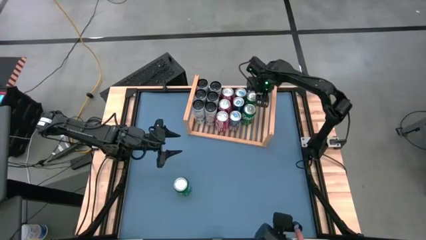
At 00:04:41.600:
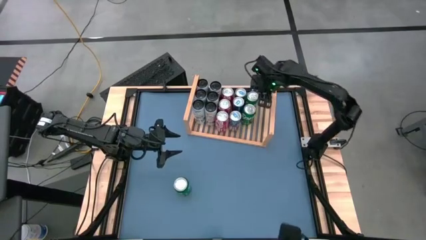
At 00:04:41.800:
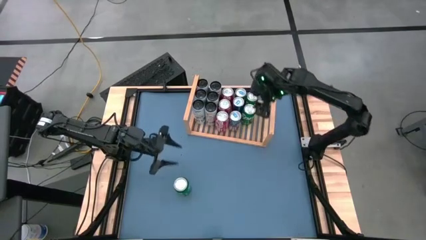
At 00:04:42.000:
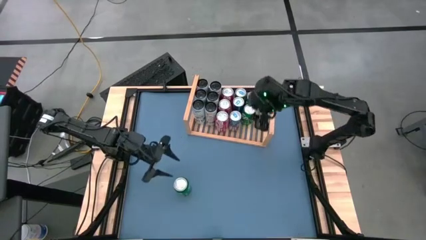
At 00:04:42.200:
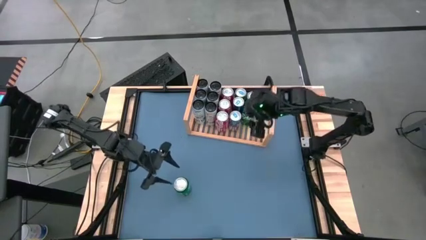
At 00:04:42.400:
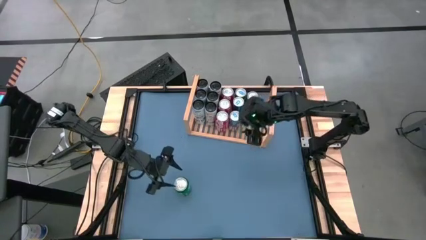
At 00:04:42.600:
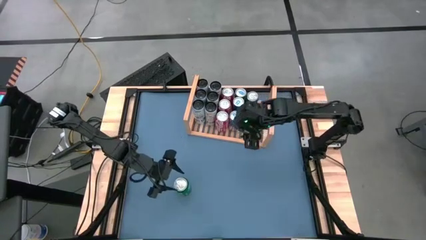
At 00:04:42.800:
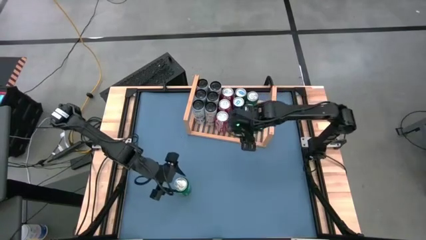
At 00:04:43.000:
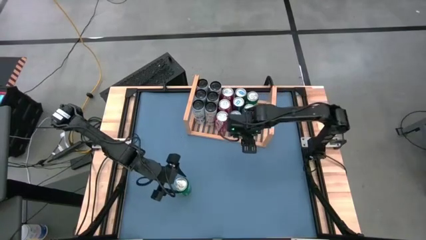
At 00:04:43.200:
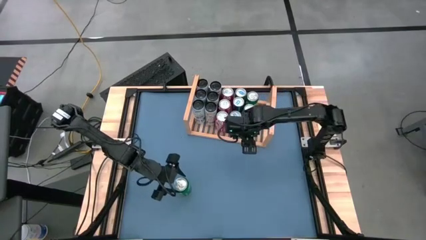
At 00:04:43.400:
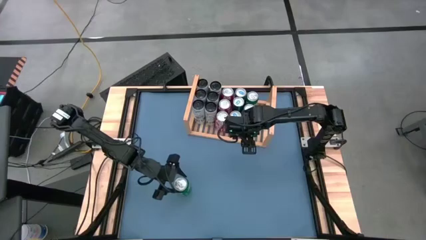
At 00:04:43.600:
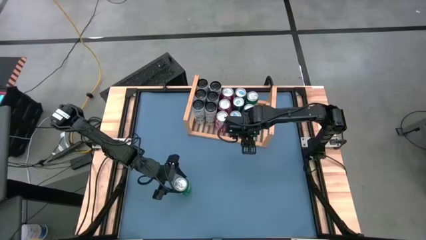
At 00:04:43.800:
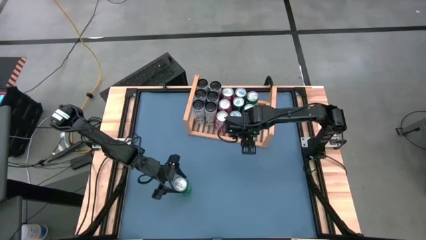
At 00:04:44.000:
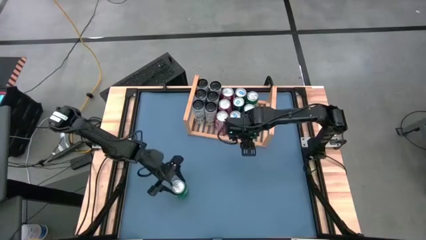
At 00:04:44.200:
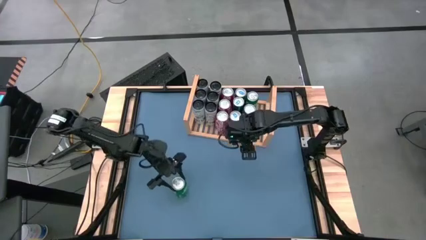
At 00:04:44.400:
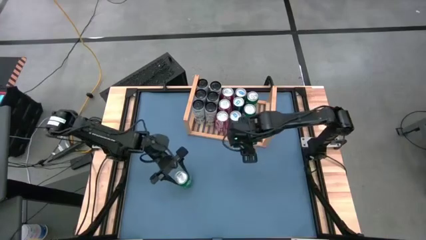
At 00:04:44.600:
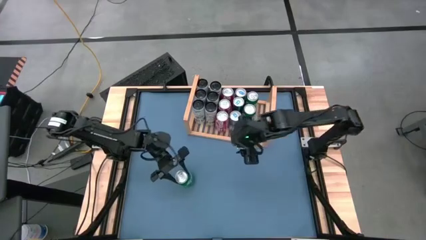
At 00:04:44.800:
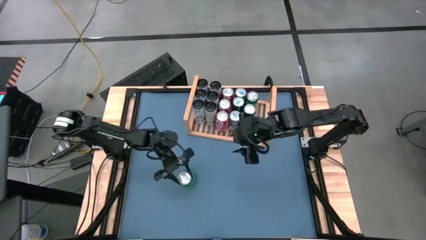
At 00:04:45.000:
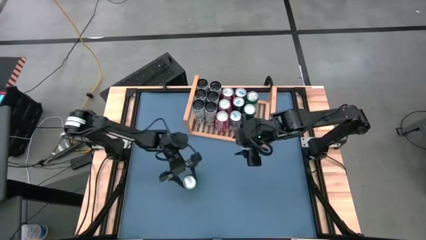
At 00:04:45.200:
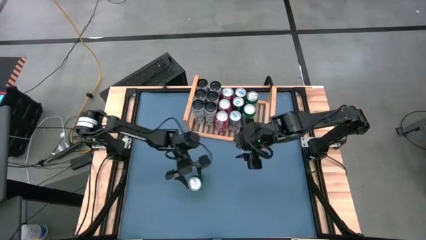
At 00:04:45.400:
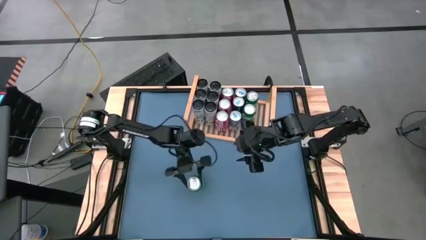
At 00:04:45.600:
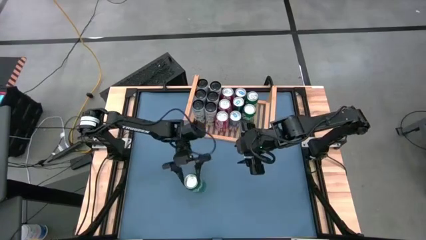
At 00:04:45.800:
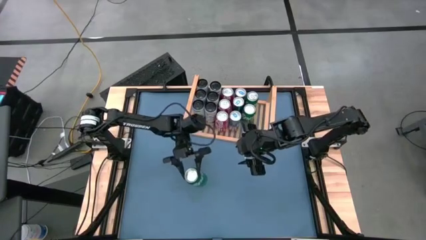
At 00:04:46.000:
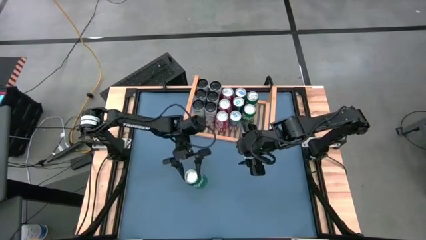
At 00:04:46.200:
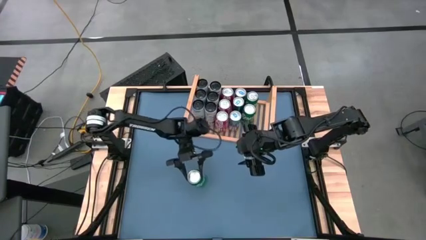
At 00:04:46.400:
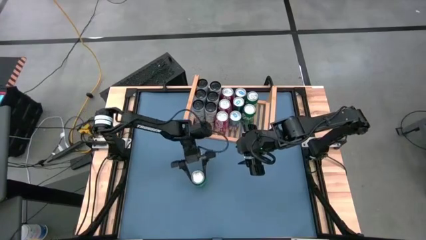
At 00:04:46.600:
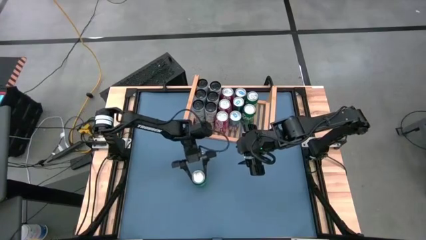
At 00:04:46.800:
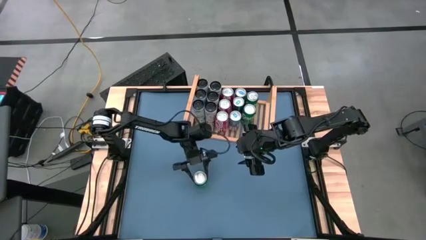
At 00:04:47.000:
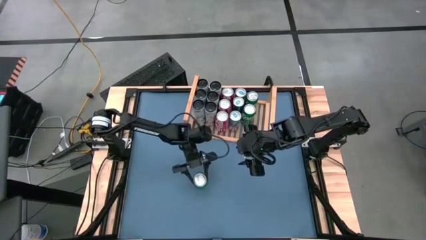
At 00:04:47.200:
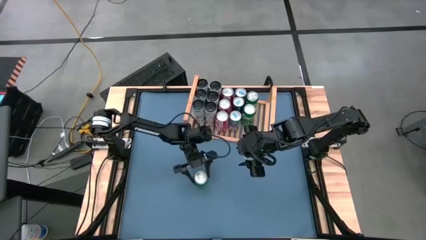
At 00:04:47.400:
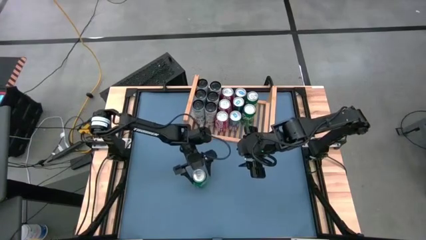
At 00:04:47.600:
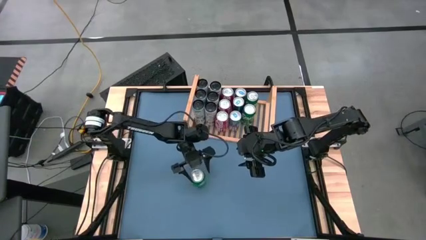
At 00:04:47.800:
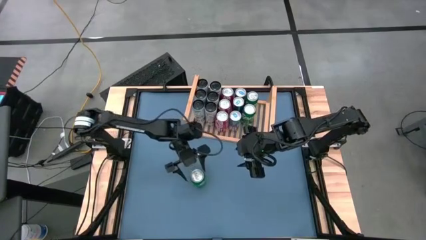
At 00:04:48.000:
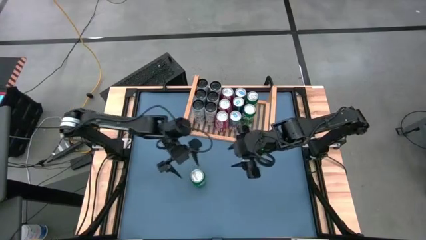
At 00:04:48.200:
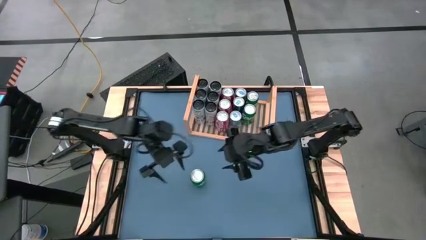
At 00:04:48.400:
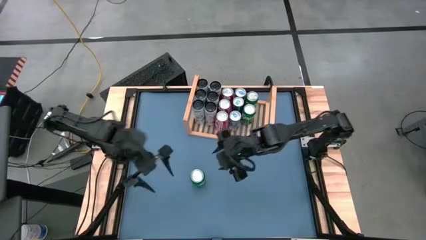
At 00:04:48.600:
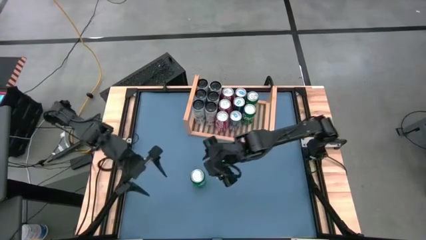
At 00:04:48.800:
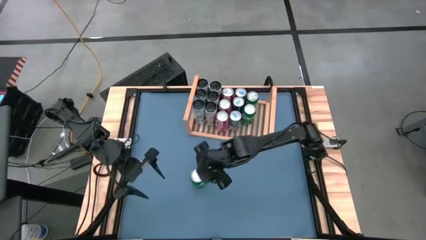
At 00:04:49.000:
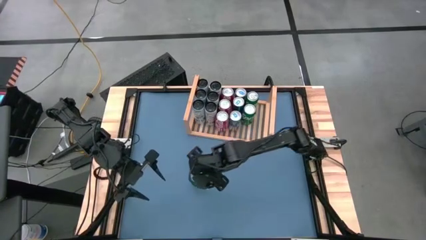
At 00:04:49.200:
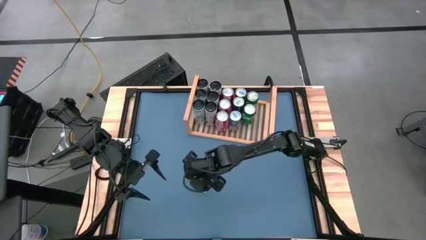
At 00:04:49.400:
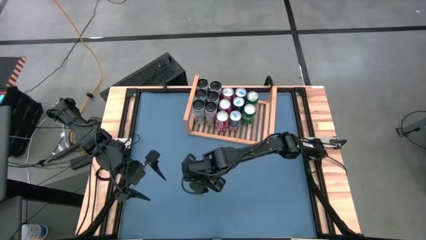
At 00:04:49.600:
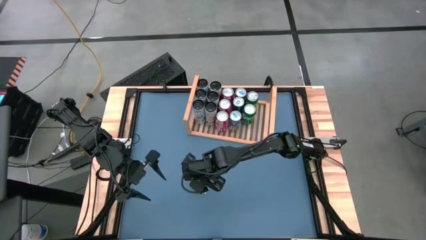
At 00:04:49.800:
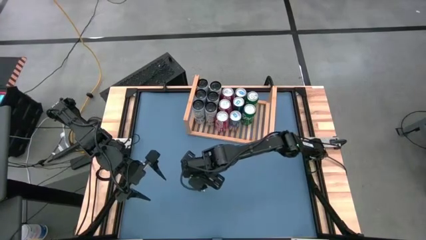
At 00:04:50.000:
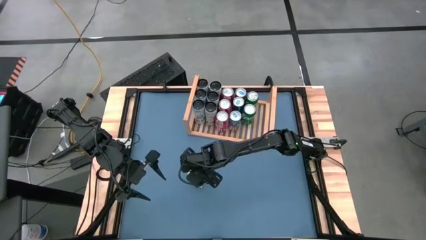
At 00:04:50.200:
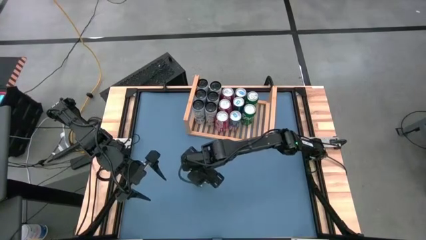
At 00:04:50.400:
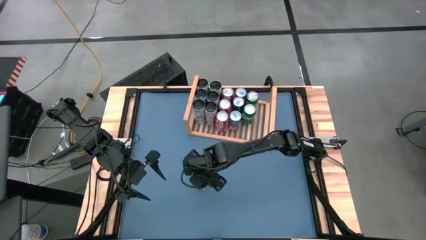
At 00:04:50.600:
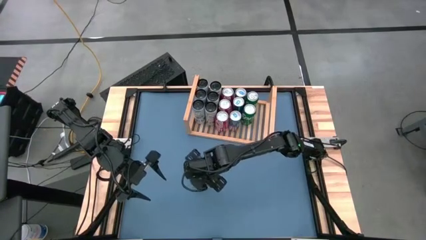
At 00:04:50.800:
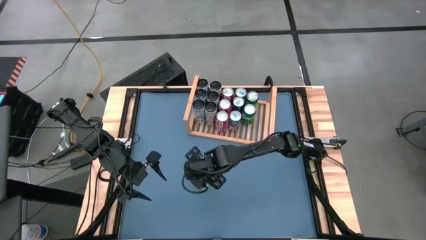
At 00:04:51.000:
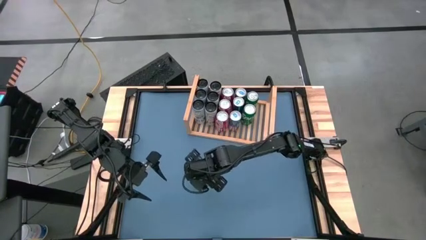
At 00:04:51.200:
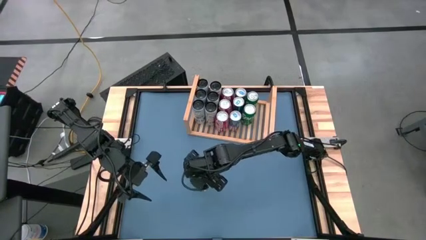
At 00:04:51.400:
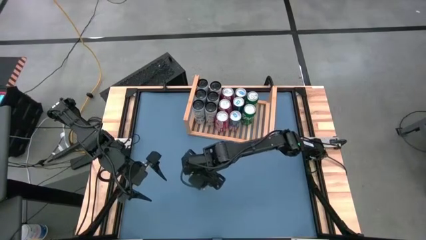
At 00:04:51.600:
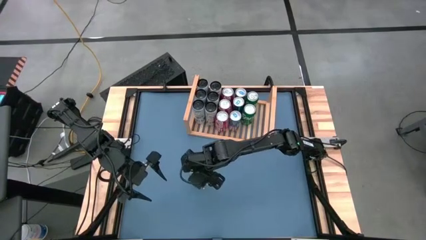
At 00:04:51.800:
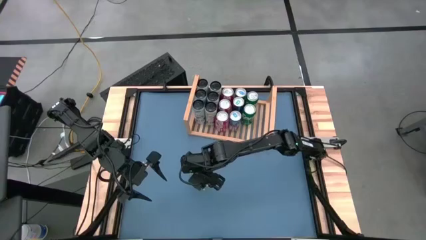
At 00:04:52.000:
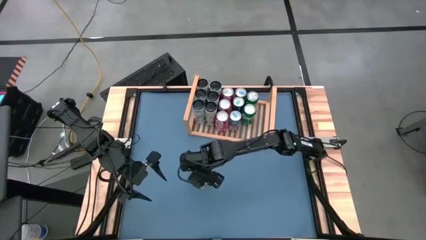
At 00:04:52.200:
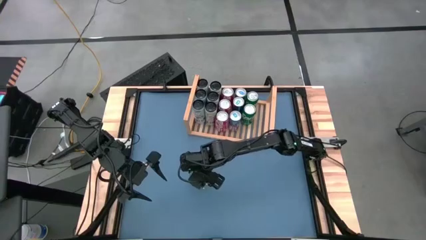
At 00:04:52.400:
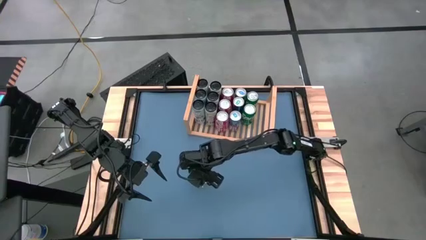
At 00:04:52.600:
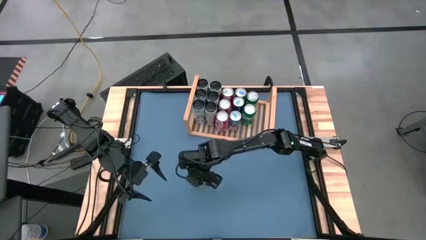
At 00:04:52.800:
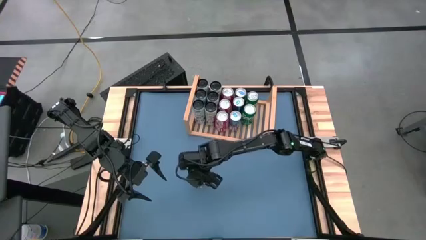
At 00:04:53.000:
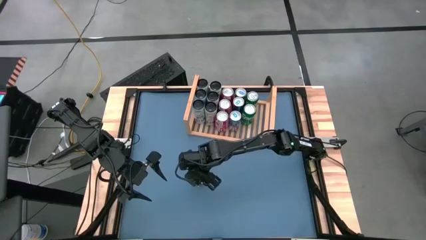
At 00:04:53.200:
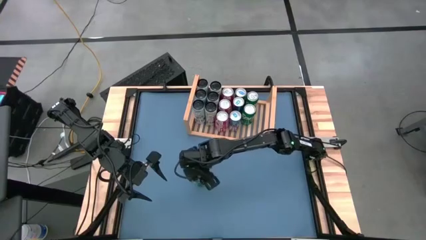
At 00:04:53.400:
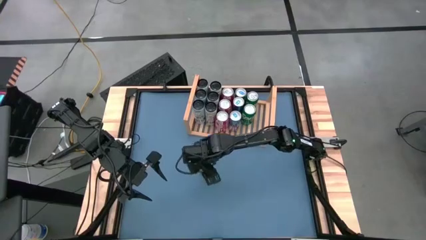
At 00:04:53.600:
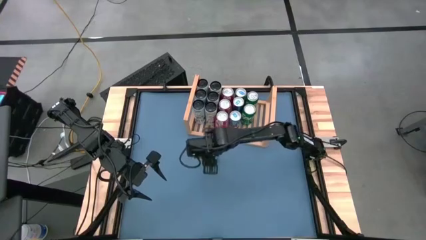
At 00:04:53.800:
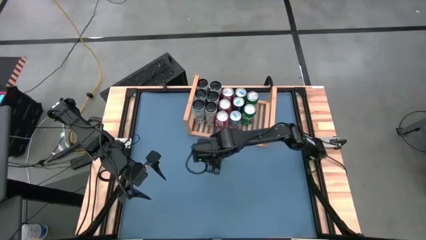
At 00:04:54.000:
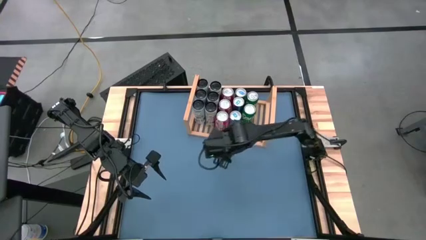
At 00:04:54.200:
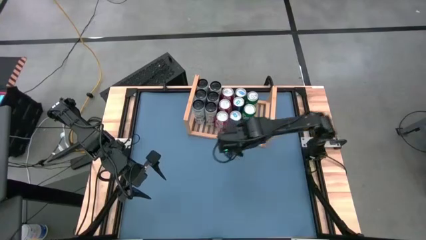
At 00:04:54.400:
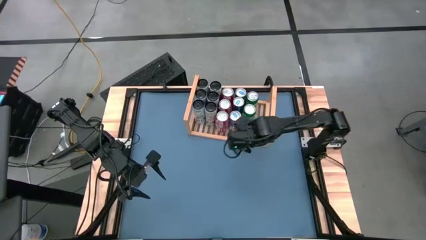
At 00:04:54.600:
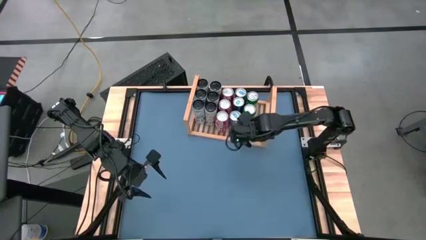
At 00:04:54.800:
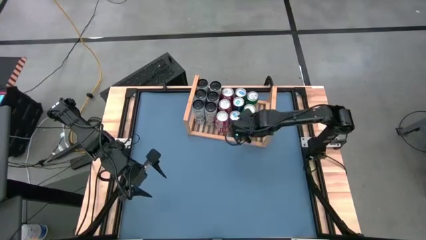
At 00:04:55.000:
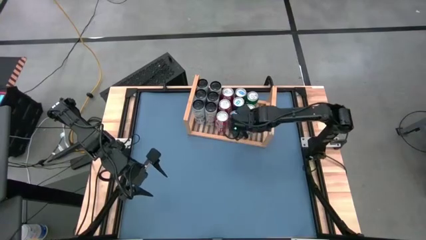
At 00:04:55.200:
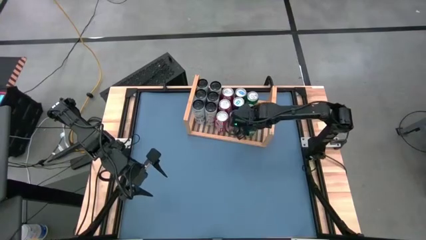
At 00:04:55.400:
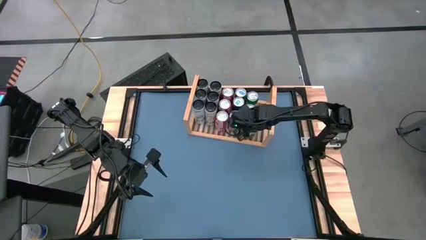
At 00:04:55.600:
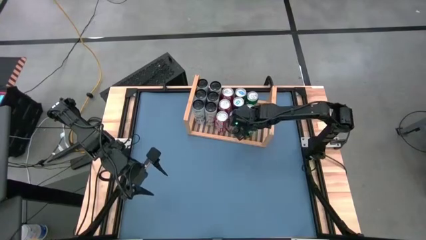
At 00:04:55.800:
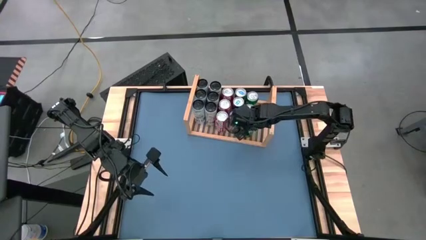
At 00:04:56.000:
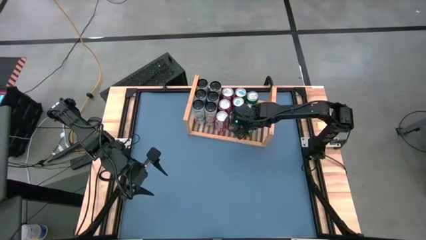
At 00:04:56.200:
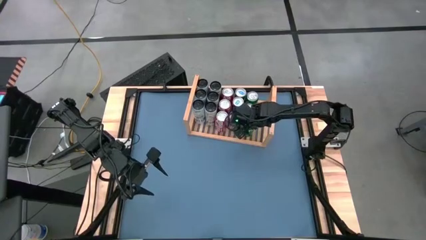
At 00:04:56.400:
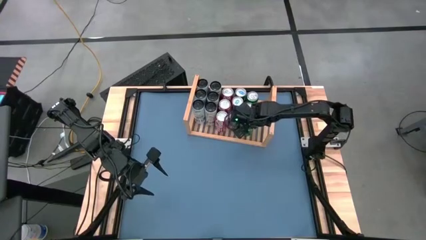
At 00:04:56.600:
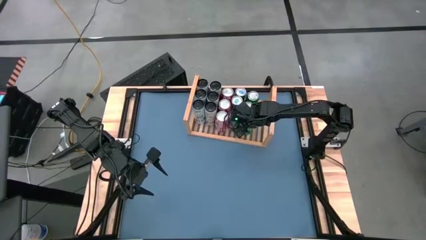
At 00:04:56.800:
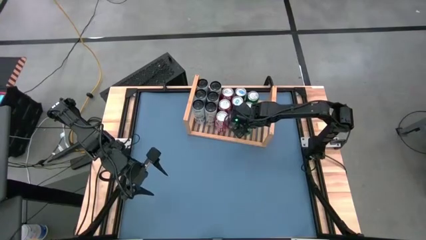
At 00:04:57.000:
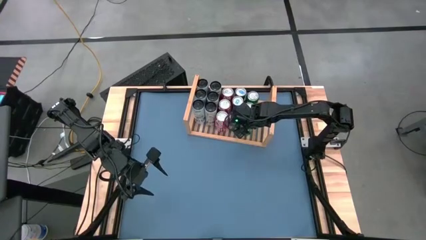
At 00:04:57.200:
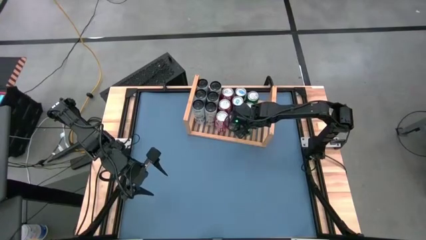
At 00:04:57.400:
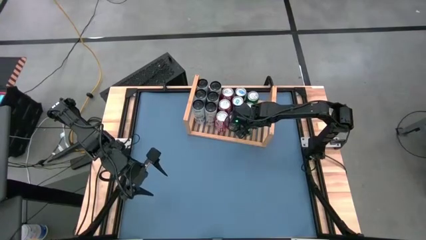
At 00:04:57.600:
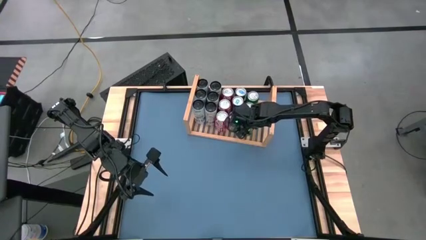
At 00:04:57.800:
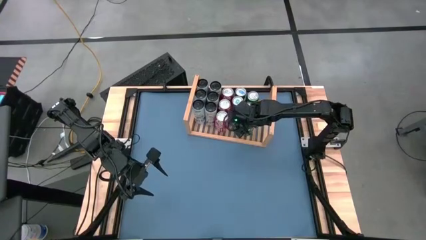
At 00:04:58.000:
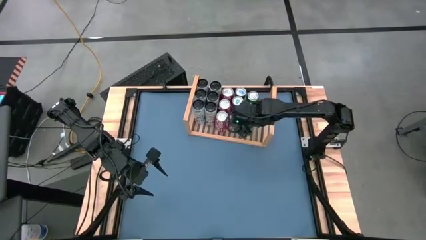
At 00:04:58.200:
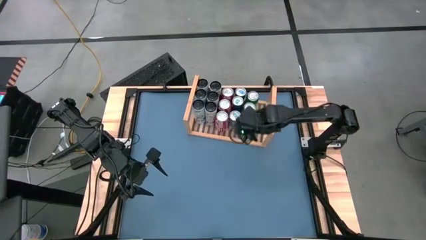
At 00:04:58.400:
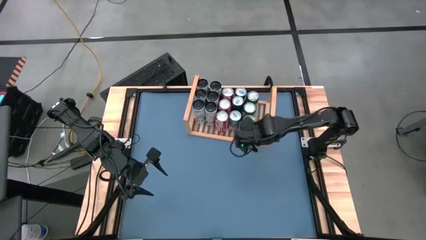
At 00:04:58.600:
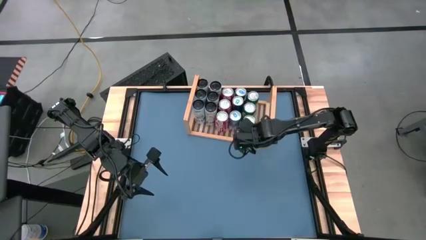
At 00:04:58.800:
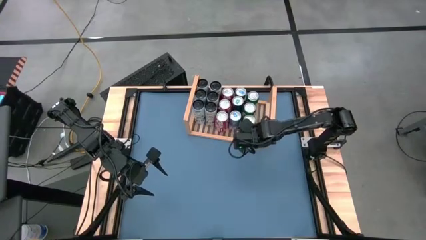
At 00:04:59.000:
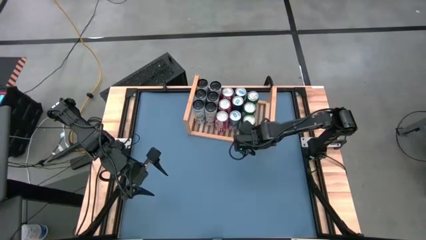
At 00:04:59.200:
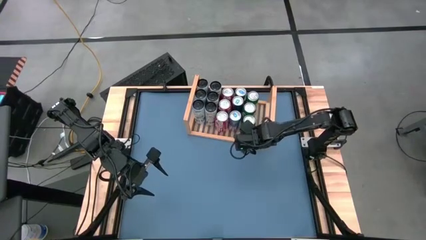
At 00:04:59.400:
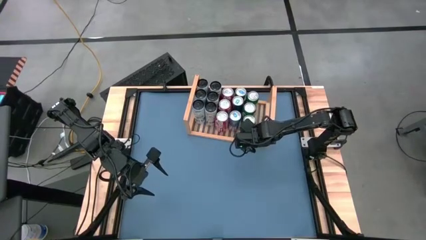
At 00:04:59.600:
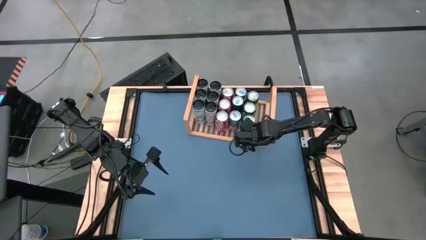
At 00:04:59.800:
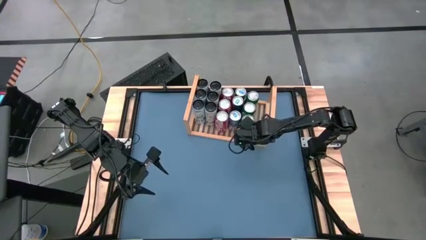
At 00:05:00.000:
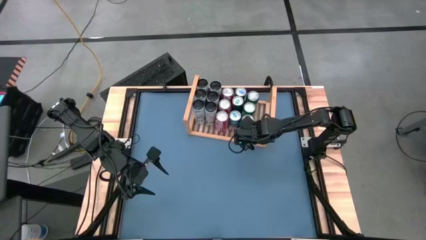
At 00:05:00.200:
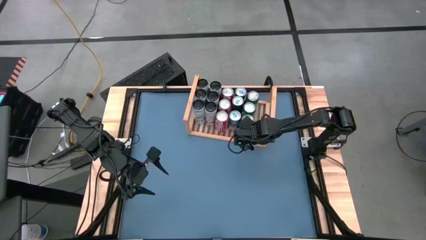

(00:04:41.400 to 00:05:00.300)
Task: Place canned beverage on shelf
Put the green soda can on the shelf aligned with the other green soda can
